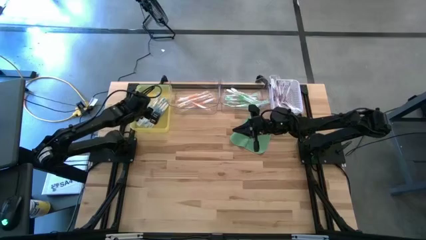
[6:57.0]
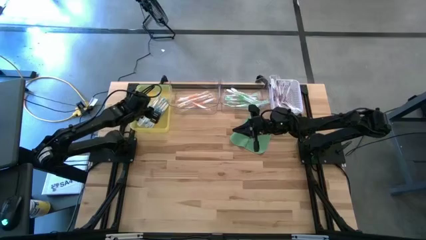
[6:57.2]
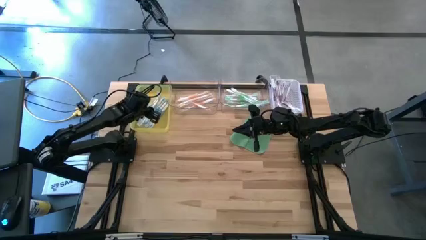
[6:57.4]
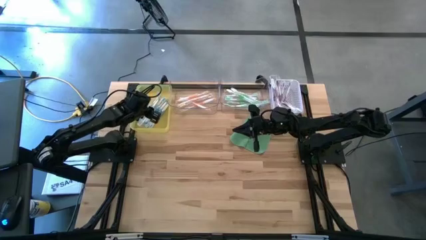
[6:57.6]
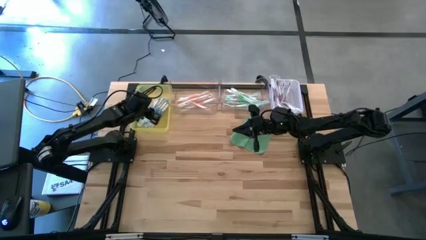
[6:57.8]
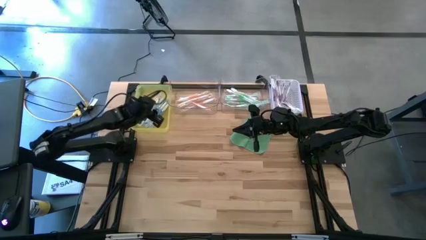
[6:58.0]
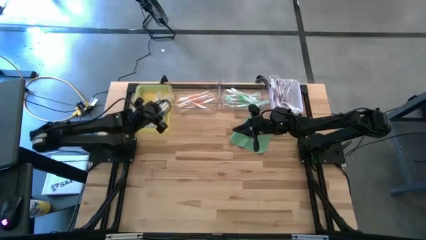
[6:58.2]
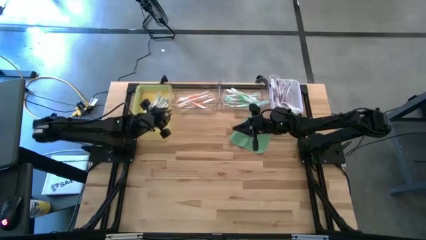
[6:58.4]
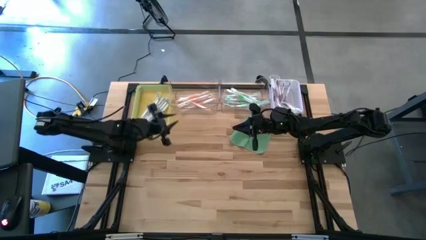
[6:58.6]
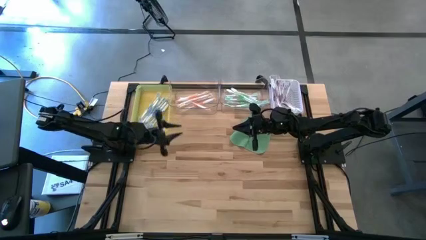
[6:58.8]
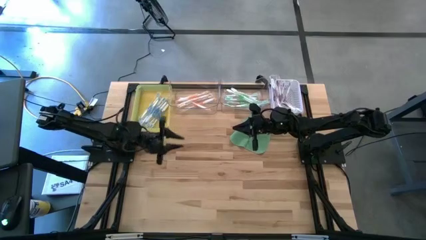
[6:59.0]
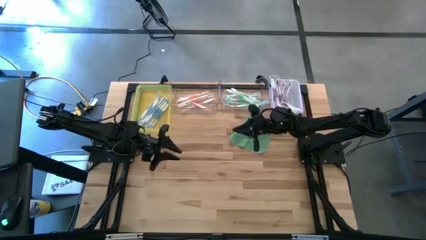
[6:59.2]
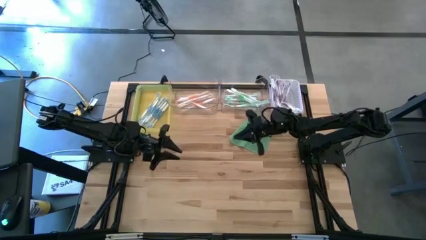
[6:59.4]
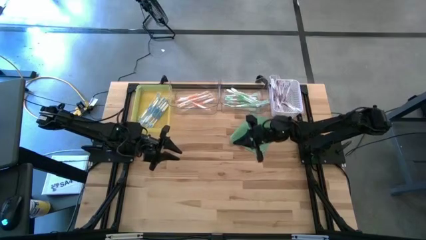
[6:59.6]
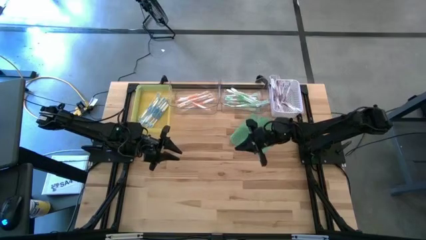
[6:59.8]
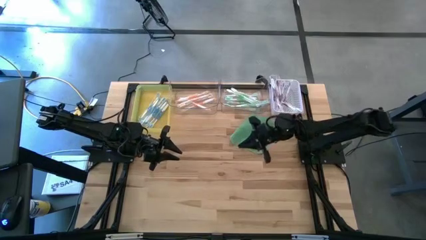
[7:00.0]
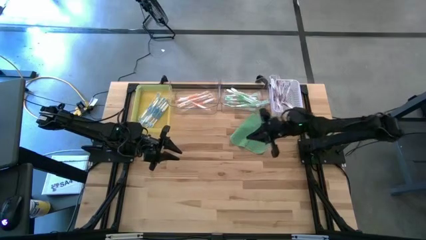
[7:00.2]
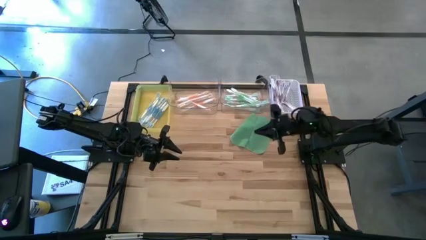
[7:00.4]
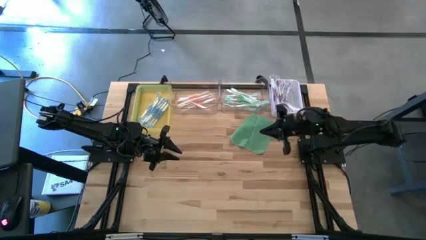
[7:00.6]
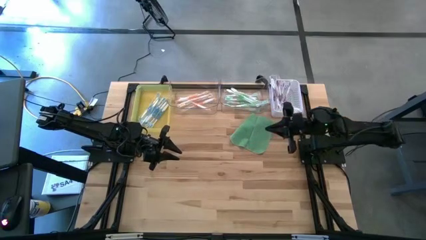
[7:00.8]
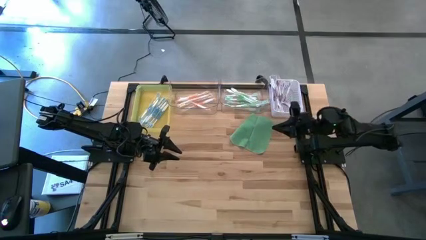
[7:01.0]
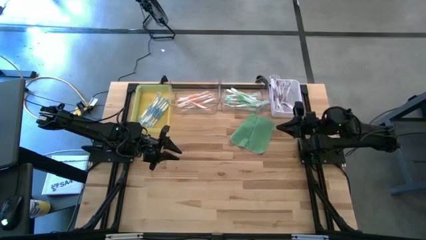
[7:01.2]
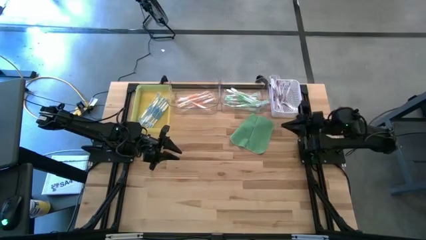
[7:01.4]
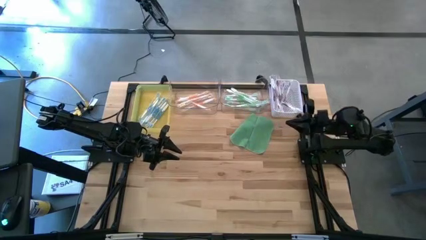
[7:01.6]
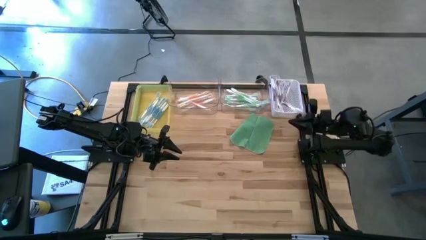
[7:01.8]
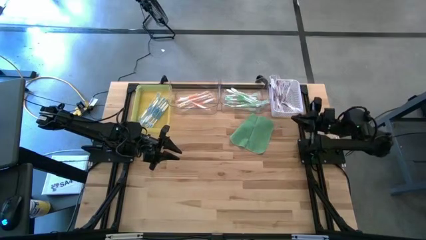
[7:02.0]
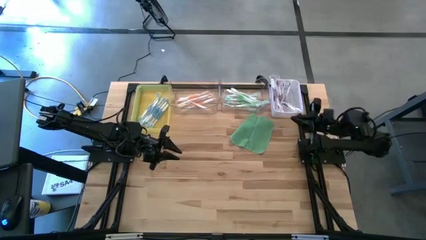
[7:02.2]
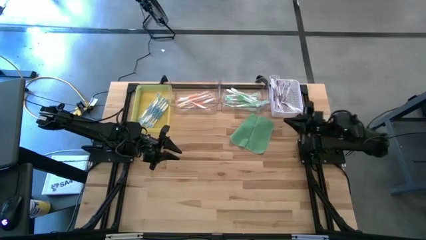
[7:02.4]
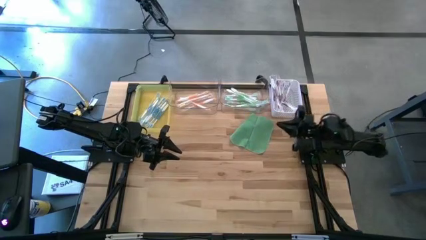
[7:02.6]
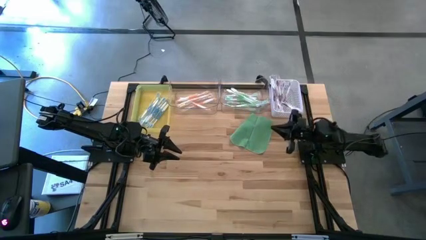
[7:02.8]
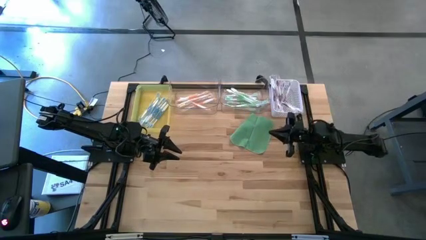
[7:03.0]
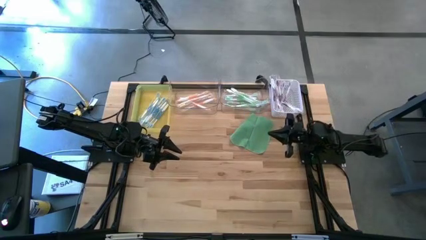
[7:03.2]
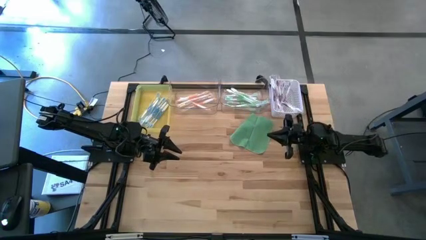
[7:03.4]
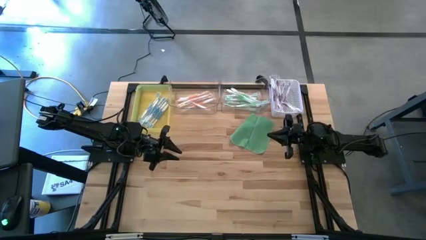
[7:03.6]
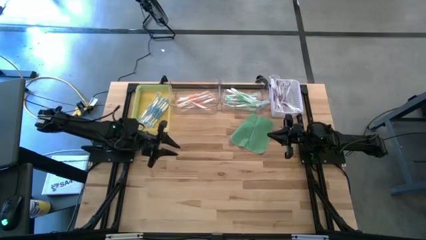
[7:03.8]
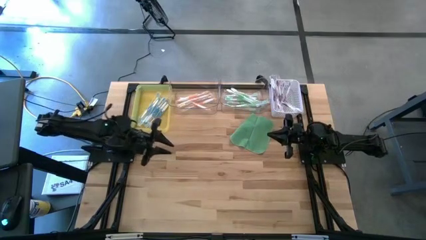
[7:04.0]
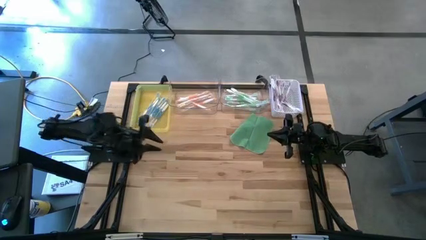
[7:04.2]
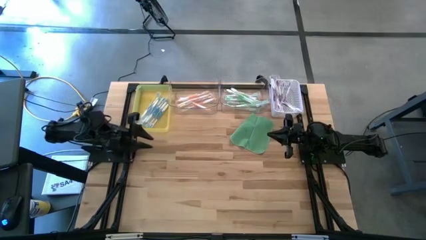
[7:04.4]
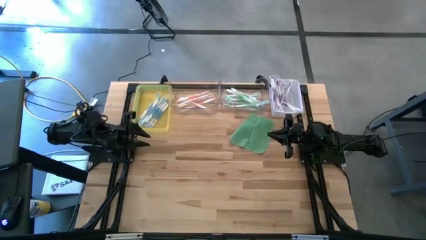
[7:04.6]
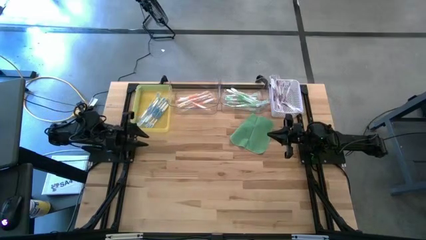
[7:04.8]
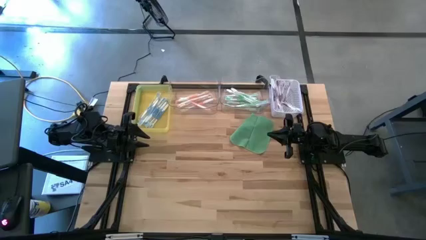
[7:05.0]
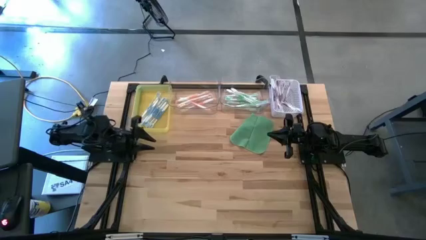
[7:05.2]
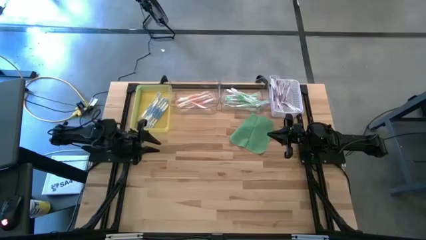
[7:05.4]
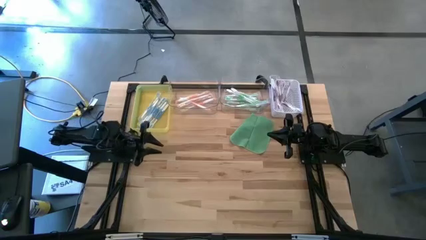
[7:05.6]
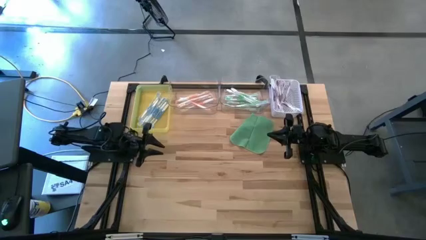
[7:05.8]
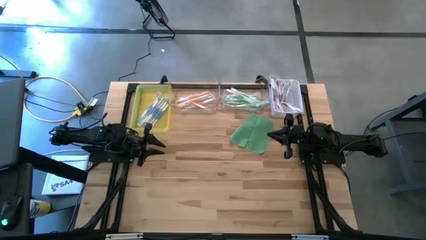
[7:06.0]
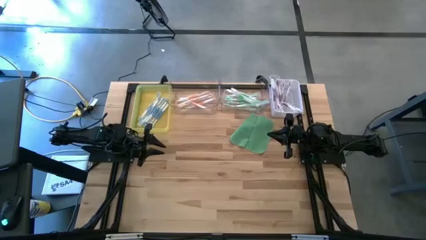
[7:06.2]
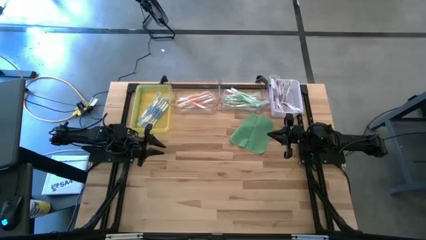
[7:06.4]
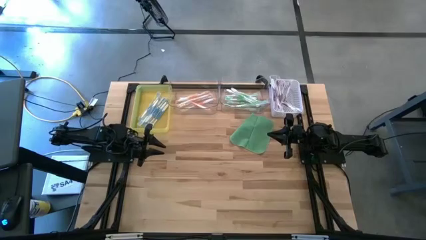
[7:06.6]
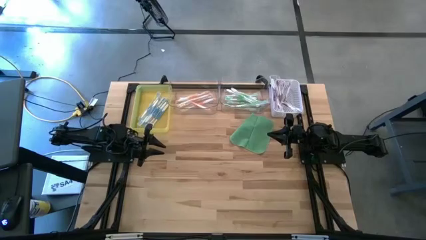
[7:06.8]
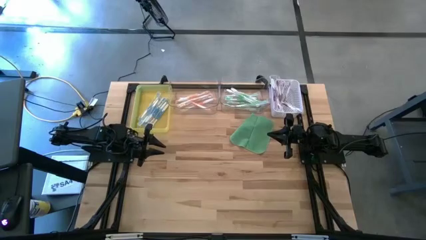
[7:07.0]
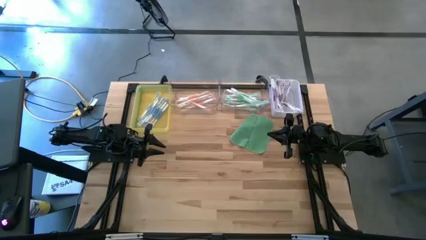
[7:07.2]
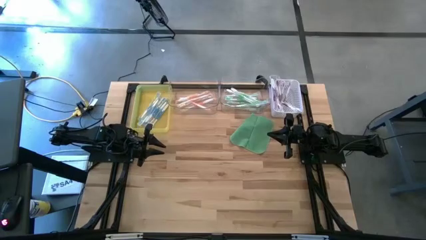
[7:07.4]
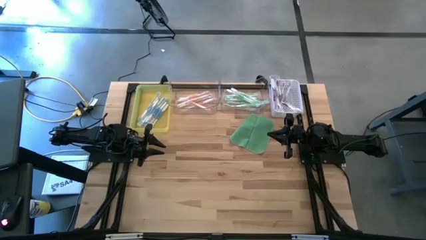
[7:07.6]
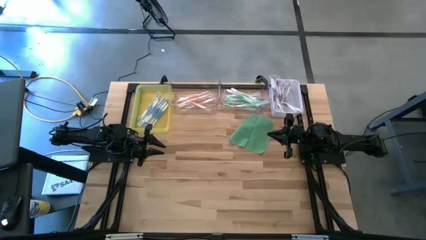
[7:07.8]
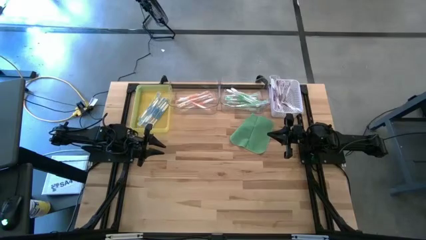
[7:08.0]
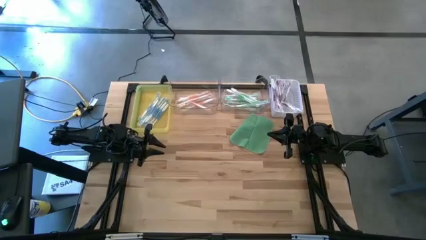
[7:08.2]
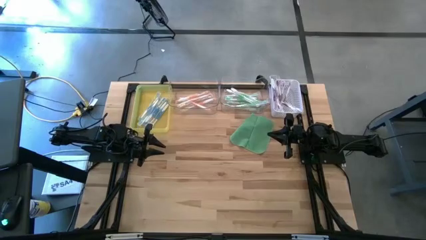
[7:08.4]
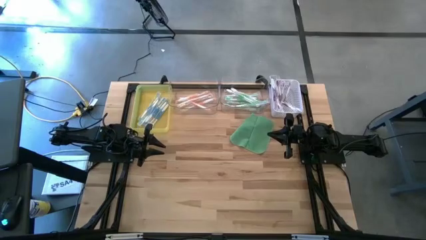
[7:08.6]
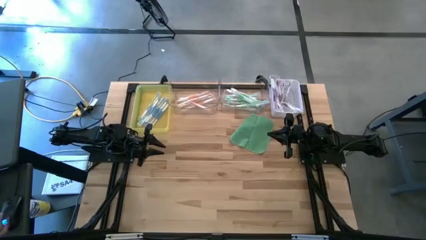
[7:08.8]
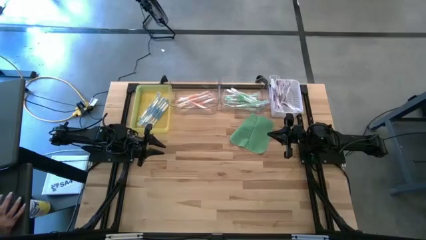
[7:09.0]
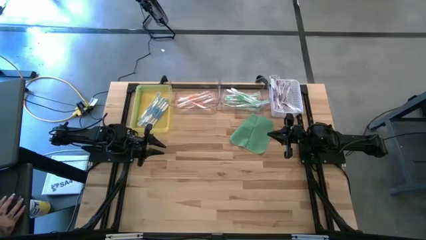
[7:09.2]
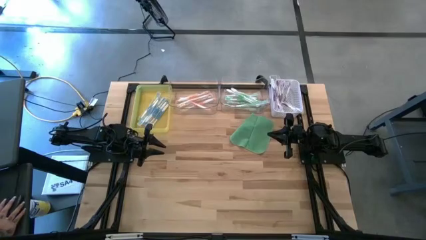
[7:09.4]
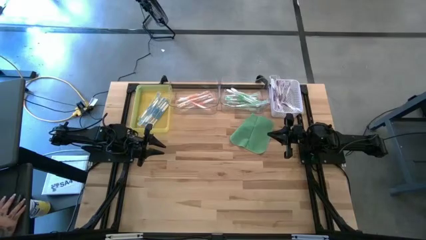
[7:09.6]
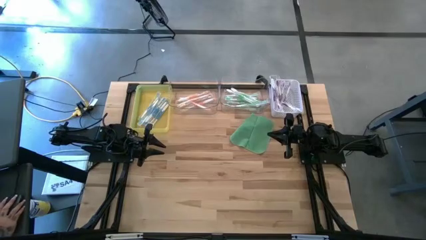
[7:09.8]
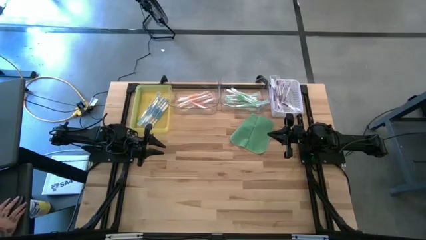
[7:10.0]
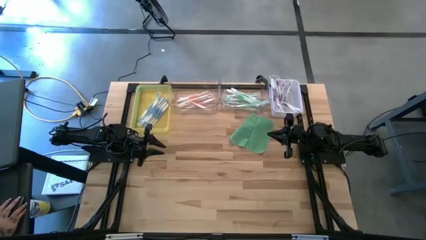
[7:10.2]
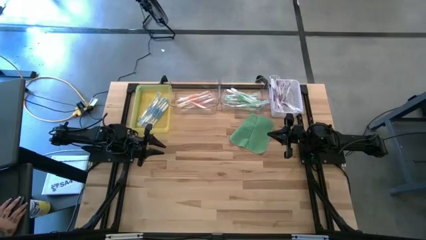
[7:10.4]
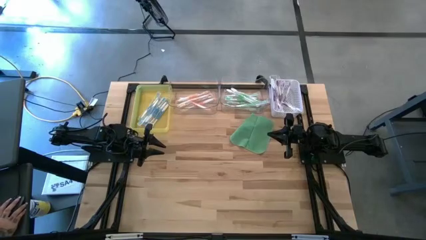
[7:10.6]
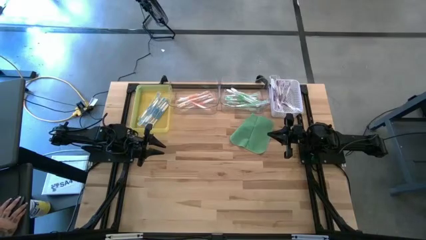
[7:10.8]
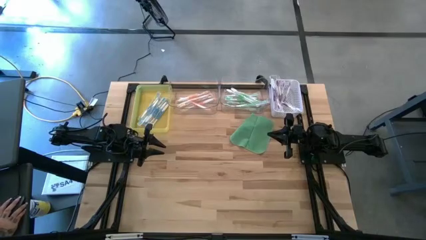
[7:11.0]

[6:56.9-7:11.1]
Task: Pick & Place Toothbrushes
Return to Home Position

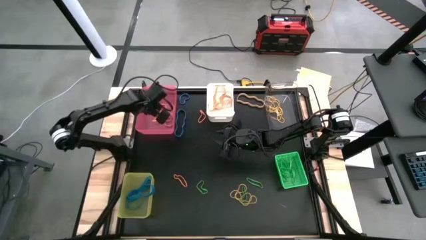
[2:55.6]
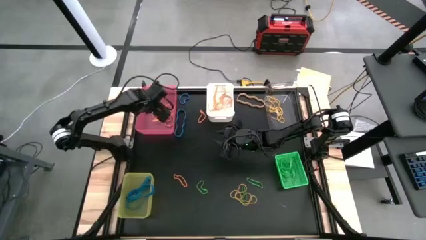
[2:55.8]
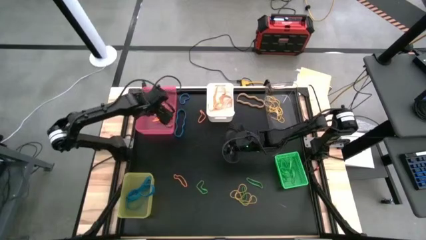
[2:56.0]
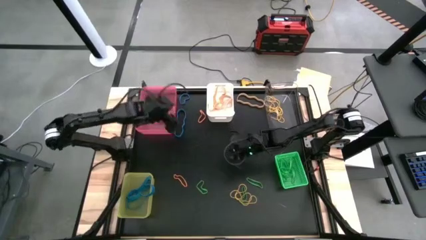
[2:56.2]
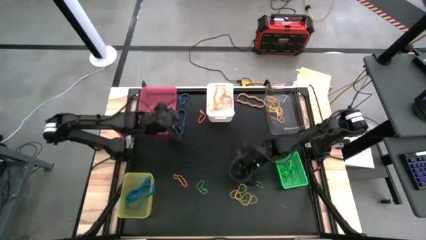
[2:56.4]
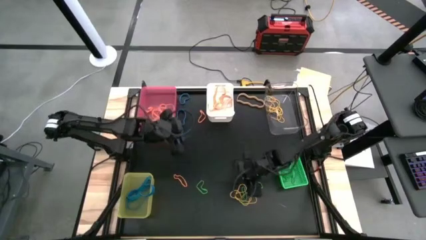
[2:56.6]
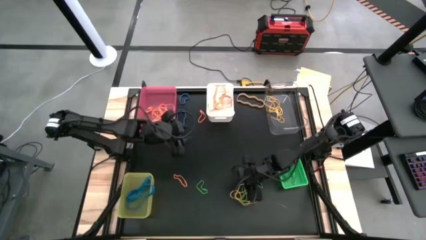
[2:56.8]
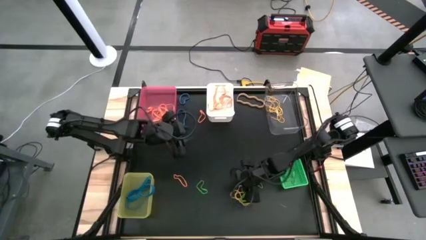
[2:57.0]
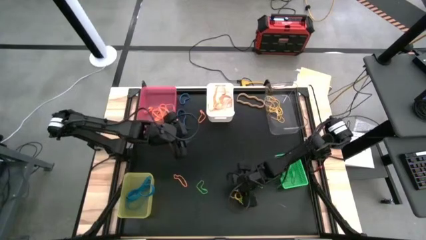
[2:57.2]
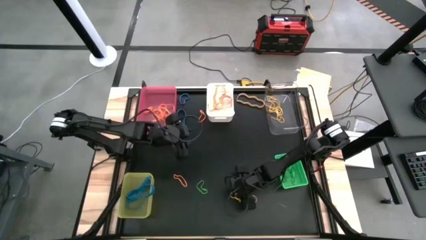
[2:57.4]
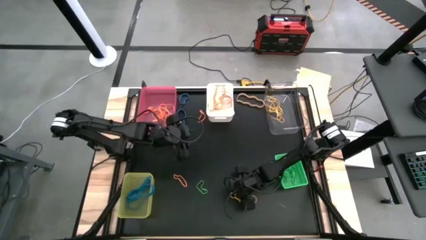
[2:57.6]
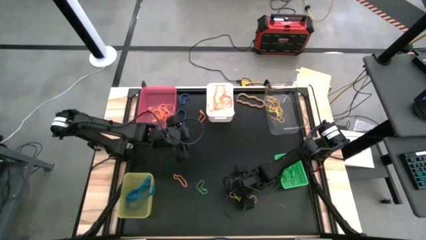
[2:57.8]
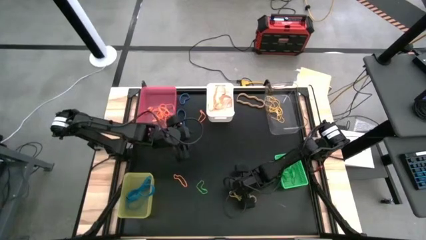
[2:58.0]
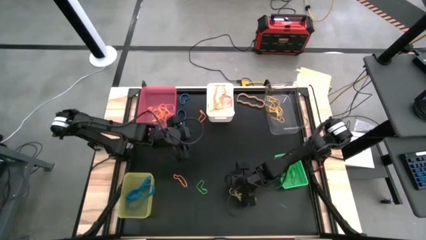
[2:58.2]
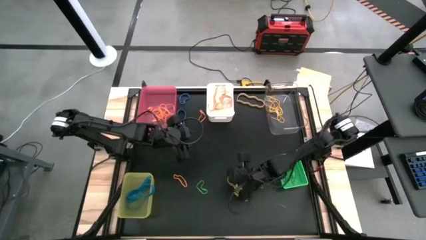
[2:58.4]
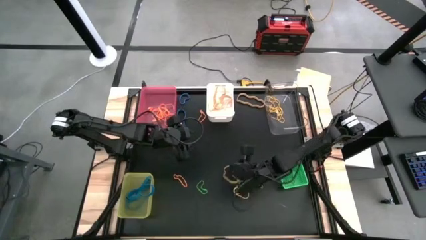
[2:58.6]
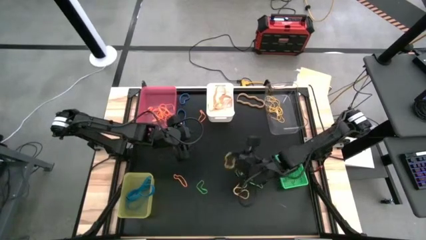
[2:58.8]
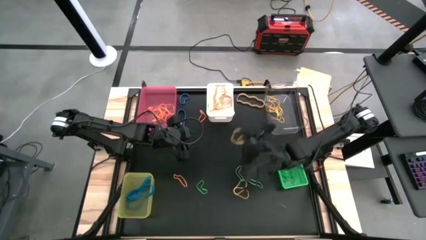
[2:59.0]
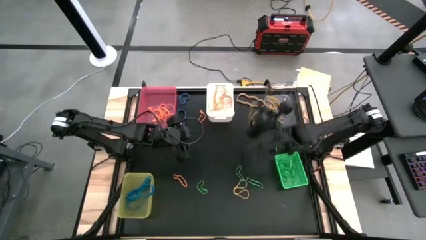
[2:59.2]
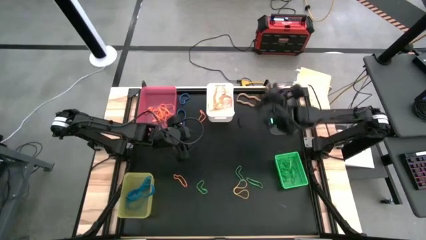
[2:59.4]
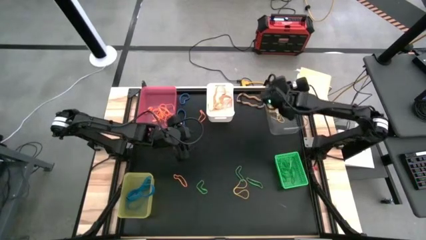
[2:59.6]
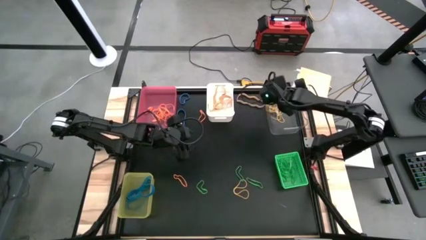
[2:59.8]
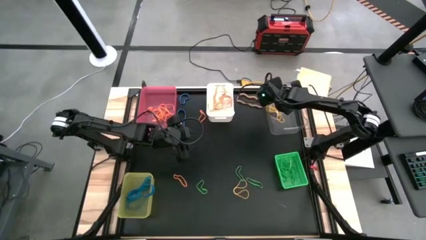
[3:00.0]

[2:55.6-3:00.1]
Task: Sort rubber bands into baskets
Put the yellow rubber band into the transparent bin
